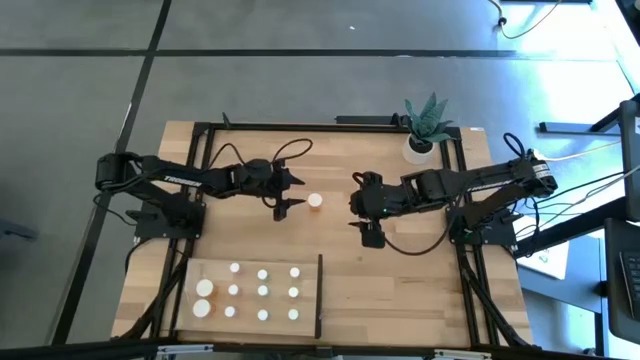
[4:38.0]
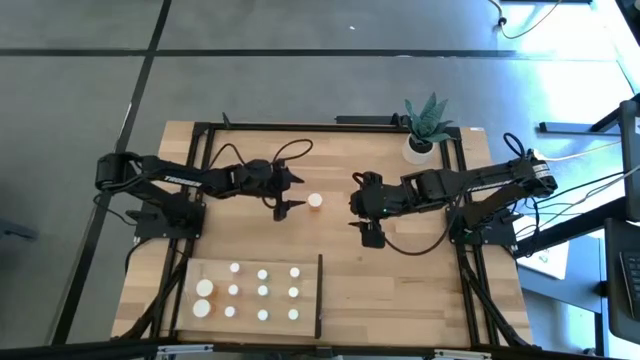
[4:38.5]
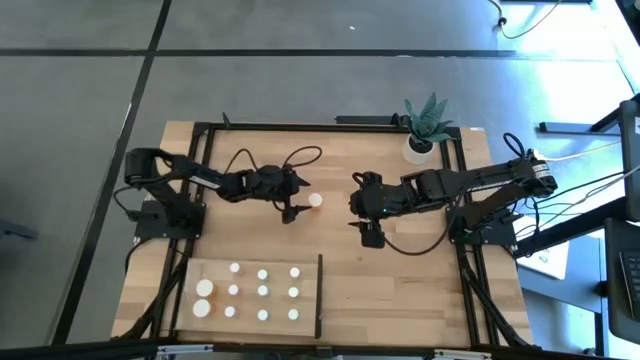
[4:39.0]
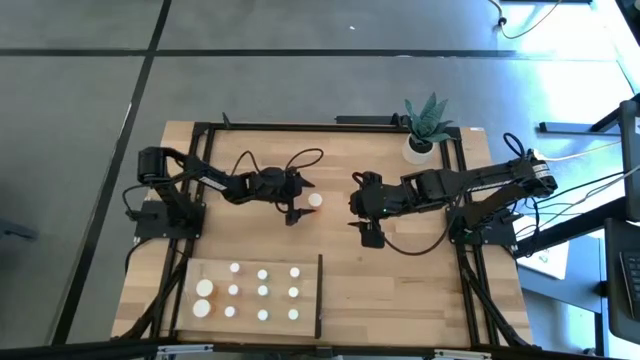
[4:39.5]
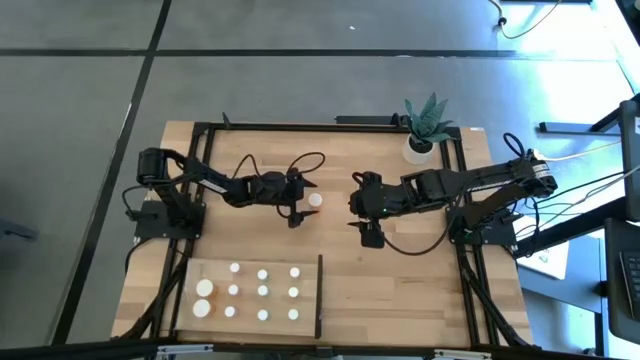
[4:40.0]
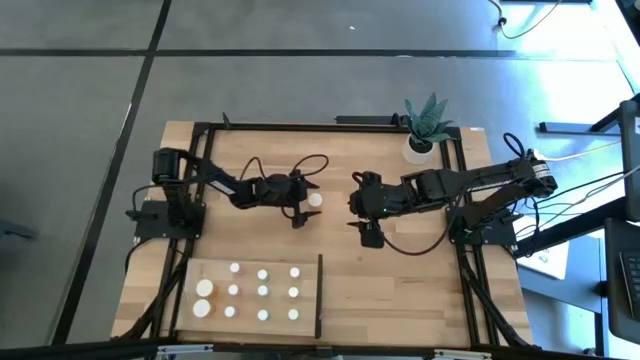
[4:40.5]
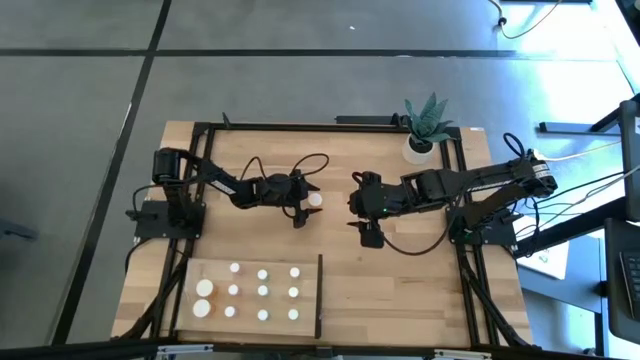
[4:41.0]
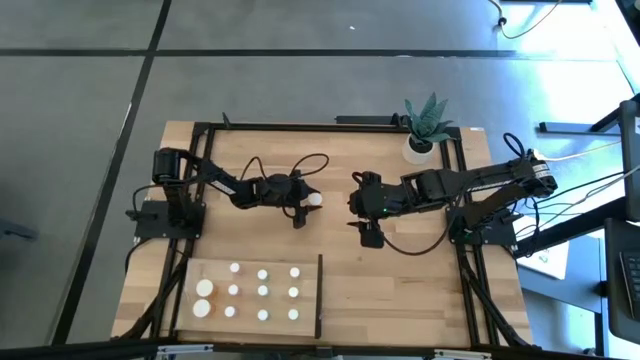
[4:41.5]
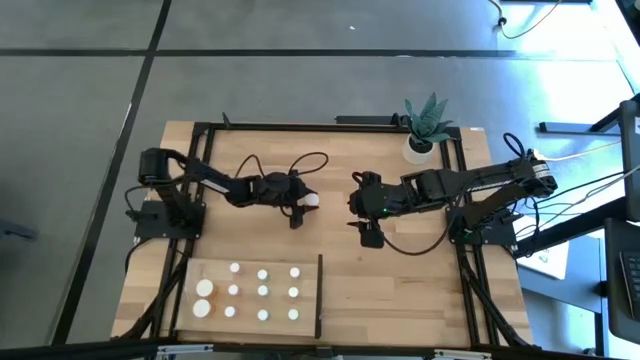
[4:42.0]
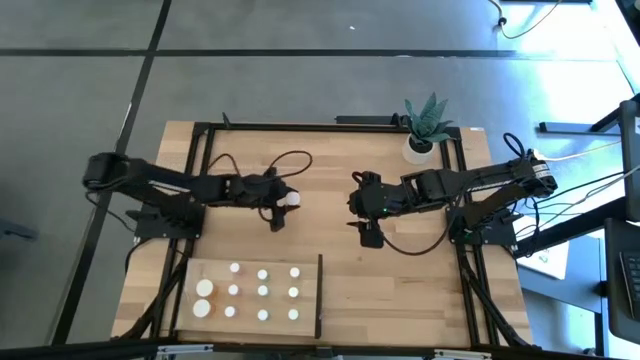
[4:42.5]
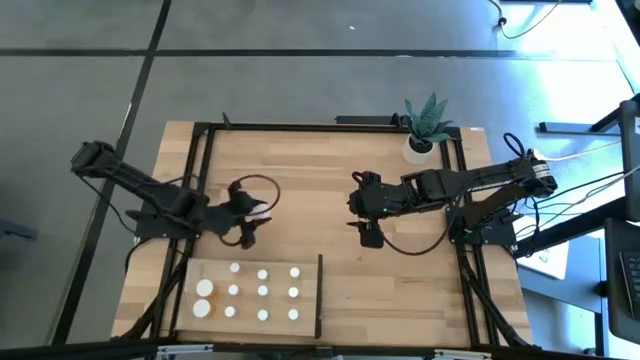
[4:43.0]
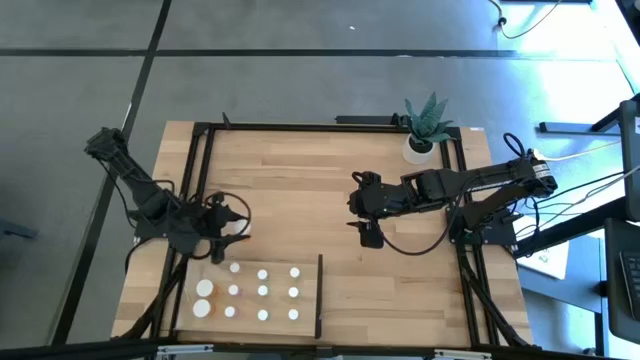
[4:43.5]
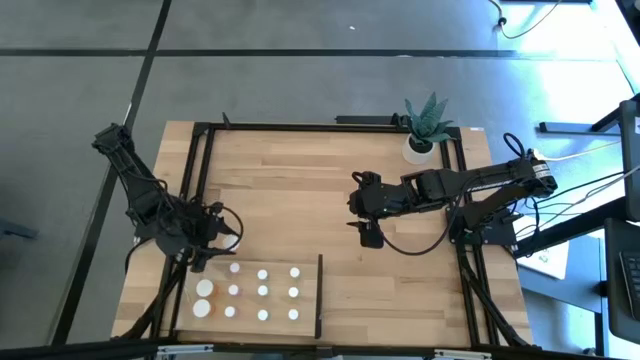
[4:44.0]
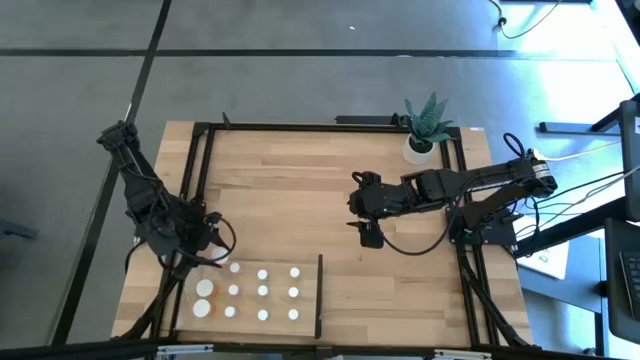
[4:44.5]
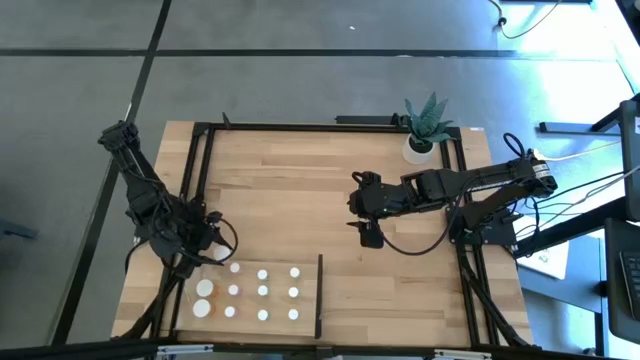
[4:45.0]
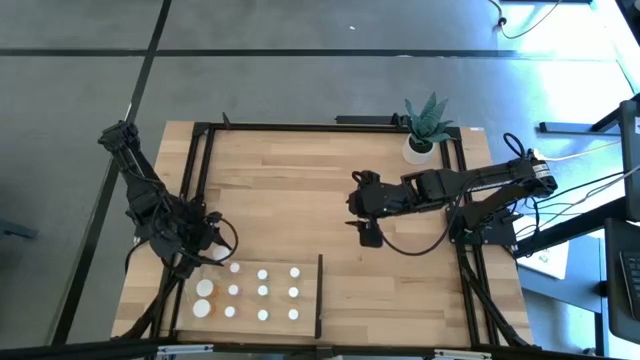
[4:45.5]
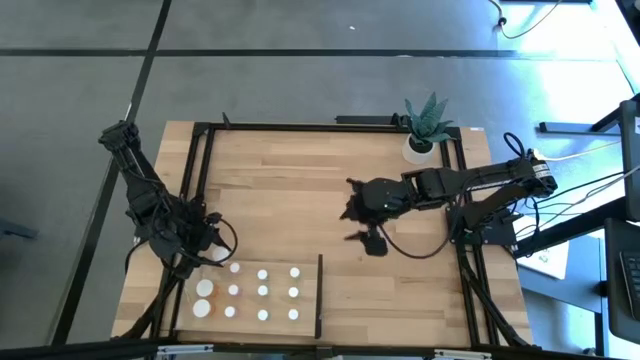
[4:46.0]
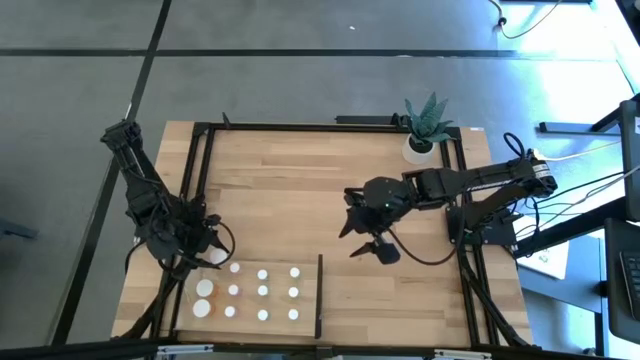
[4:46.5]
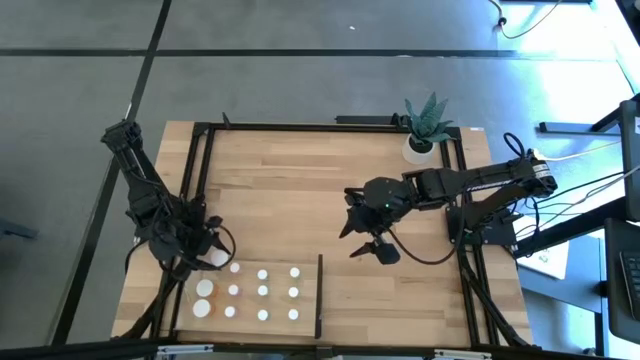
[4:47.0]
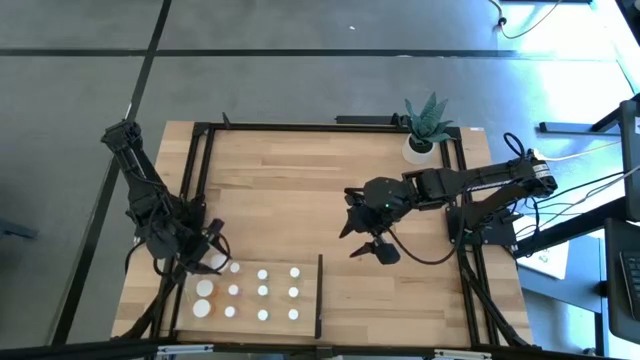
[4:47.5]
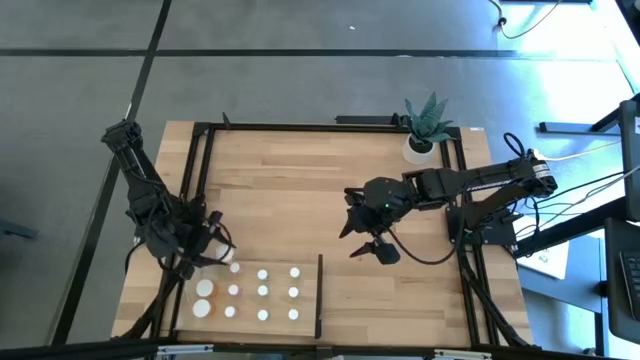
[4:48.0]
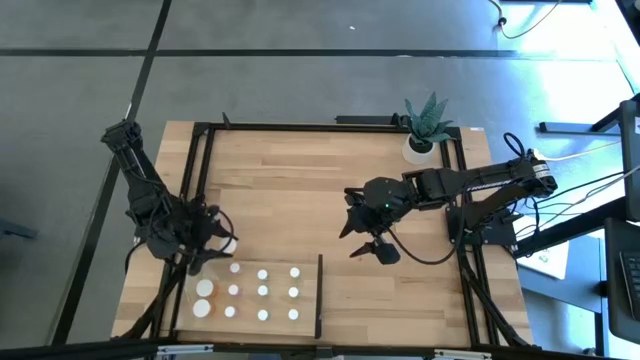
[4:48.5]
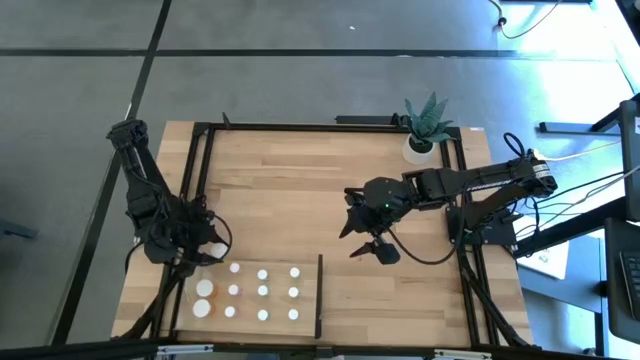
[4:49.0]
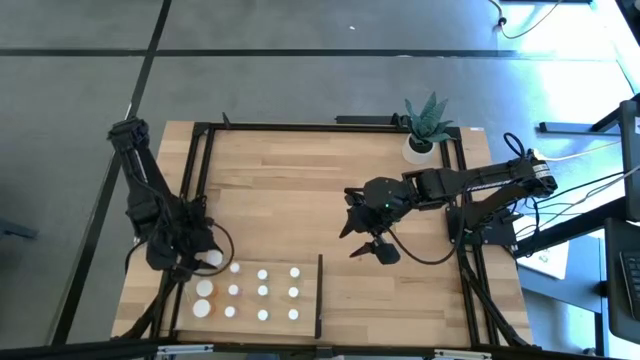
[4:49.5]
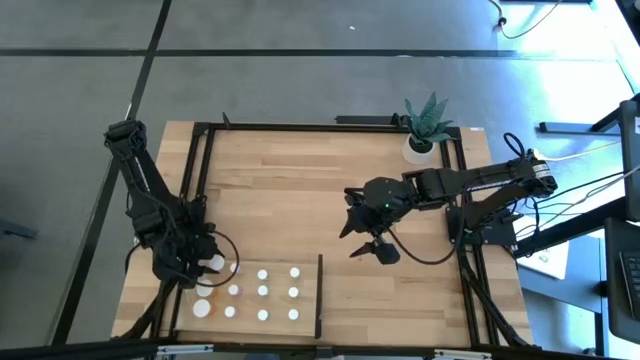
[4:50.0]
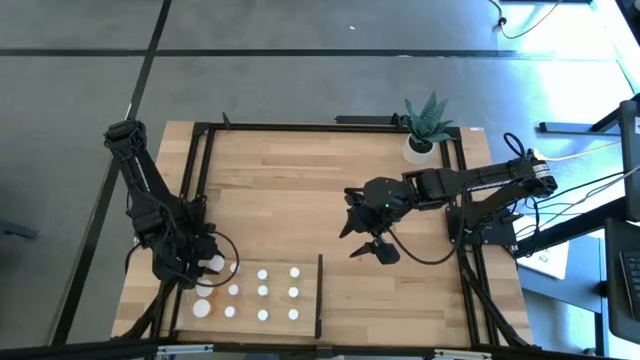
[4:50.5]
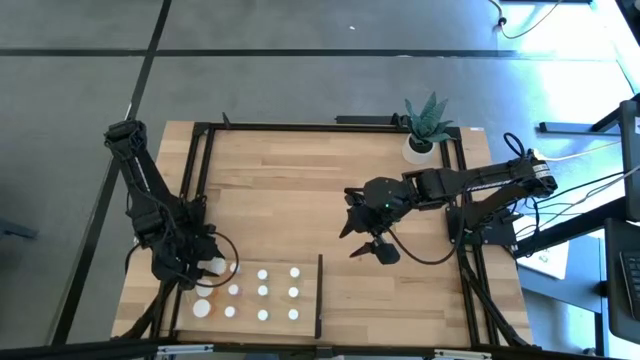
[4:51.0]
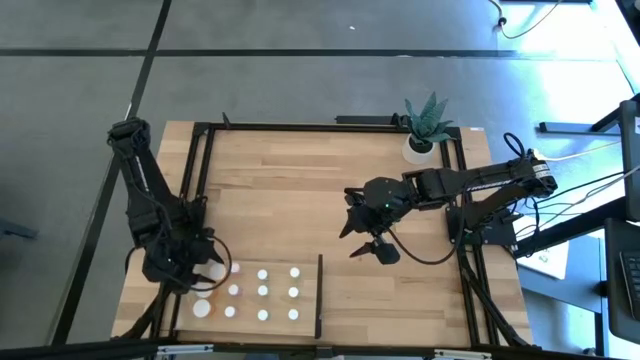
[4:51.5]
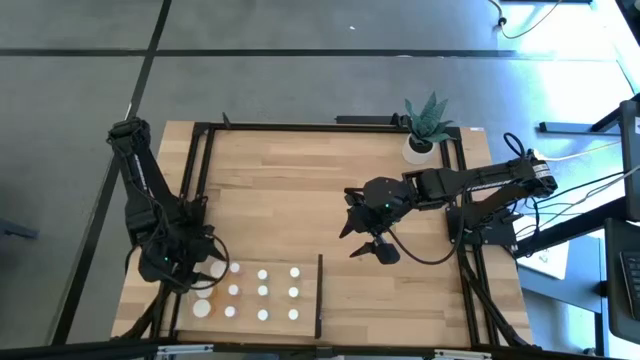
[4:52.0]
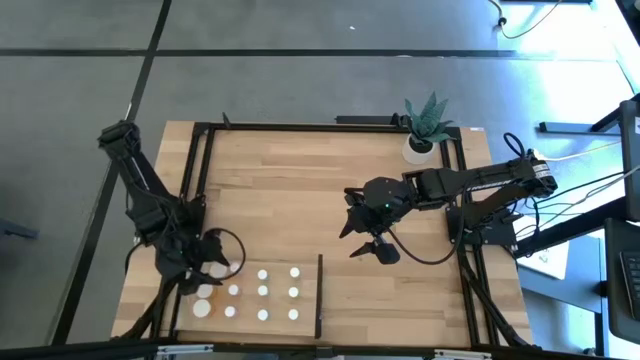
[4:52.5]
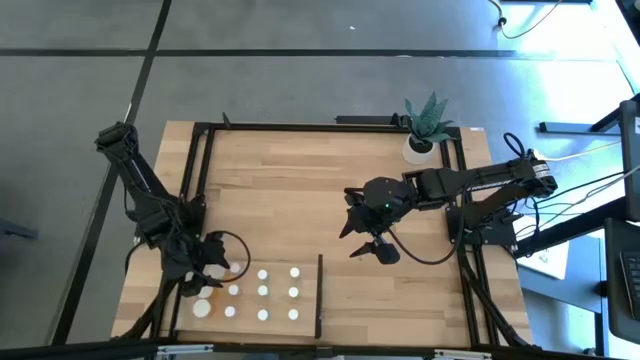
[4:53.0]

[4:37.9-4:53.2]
Task: Pick and place medicine bottles onto shelf by color
Put the orange pill bottle on the shelf aligned with the other orange pill bottle

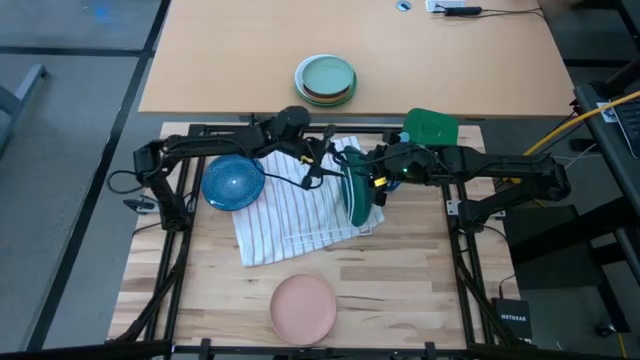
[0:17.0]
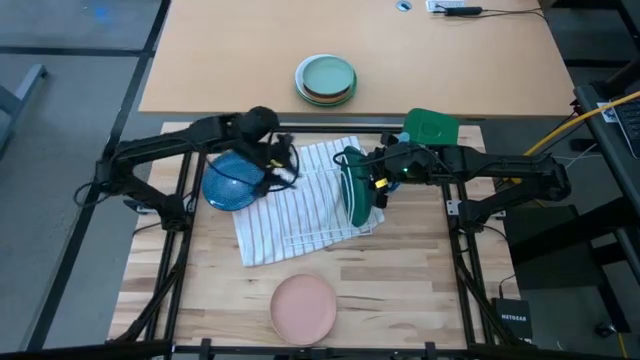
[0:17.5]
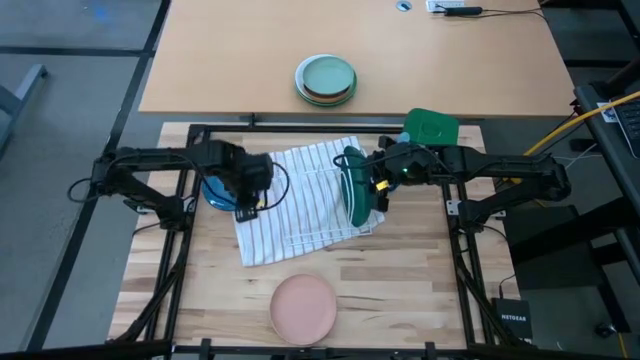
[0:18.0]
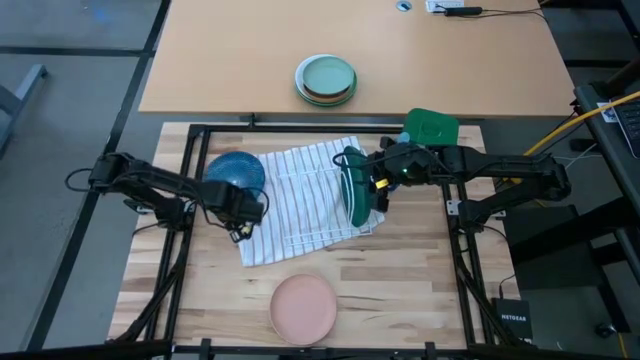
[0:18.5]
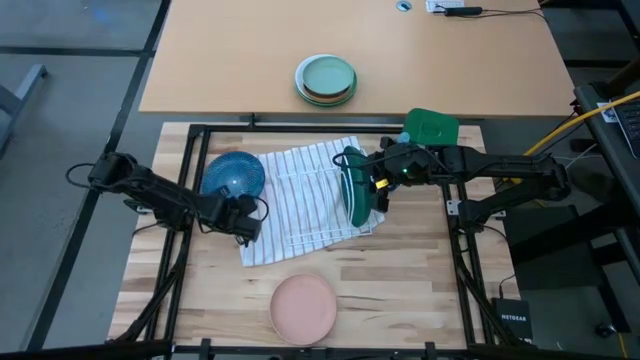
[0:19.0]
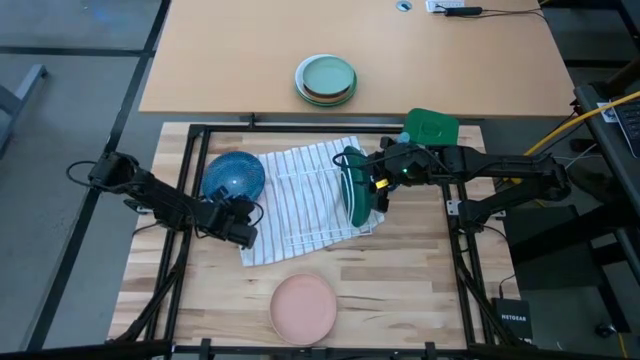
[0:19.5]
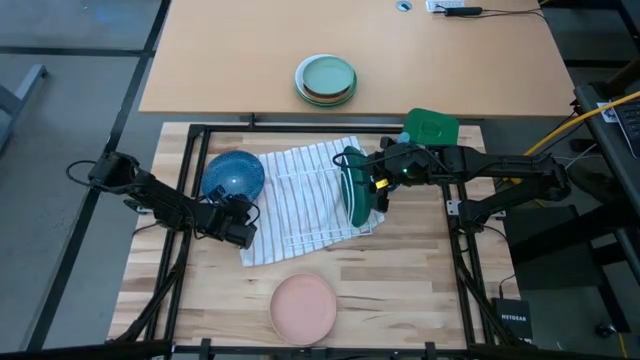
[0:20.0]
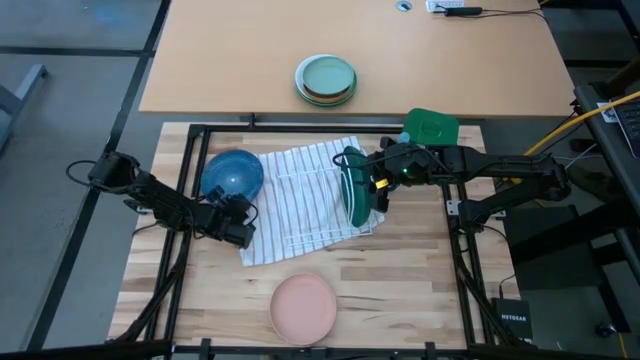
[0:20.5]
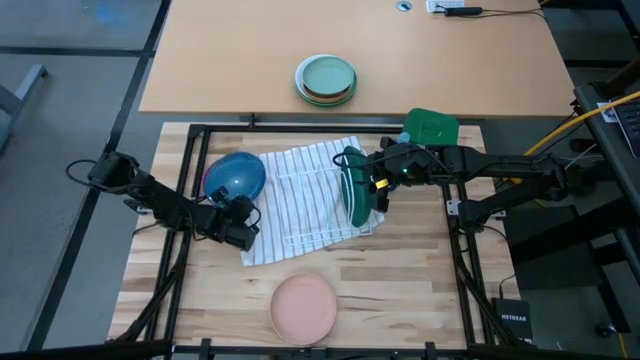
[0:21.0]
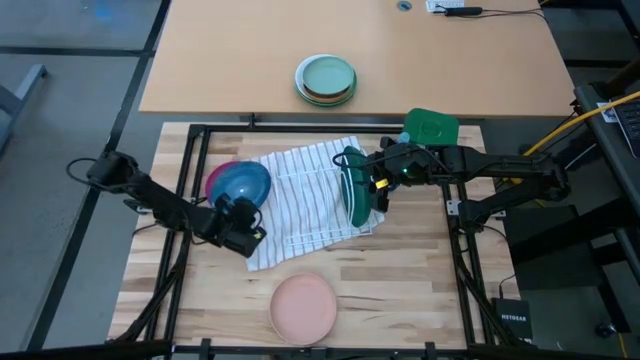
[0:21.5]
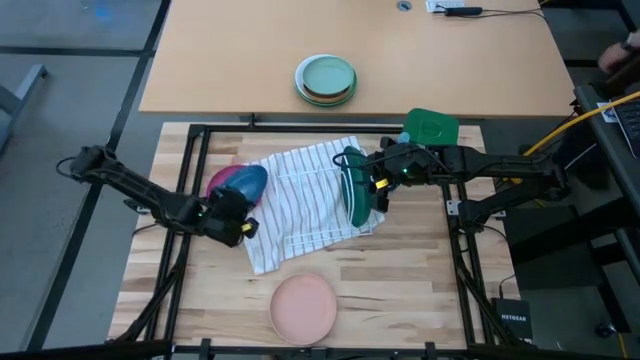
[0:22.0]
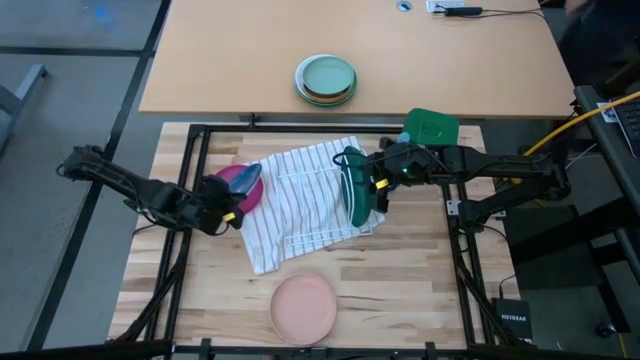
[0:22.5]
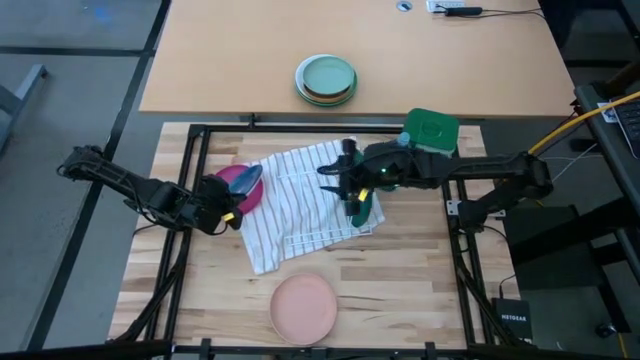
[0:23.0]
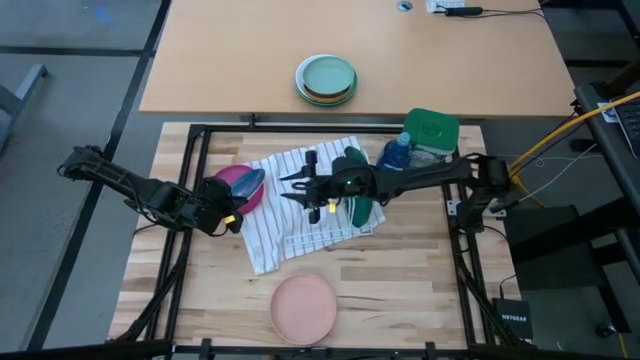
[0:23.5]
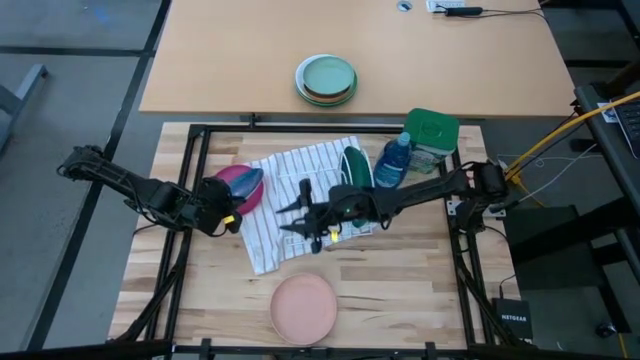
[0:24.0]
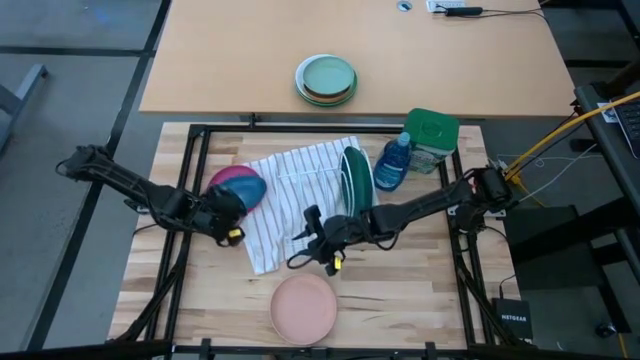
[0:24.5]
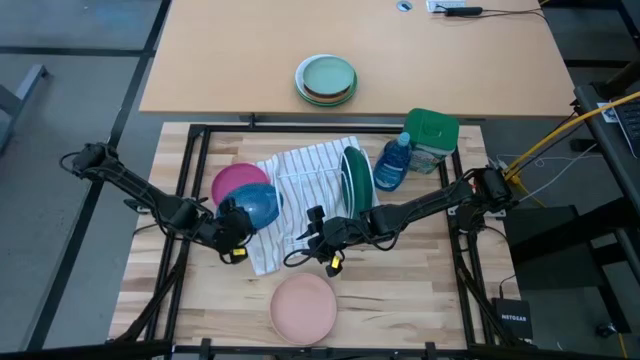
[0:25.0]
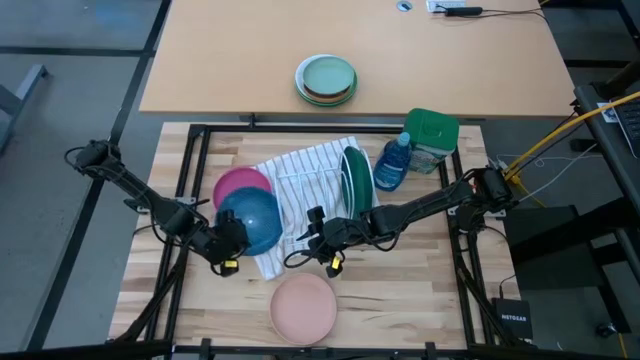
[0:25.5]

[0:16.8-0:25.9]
Task: Sort dishes
Put the blue plate in the dish rack
